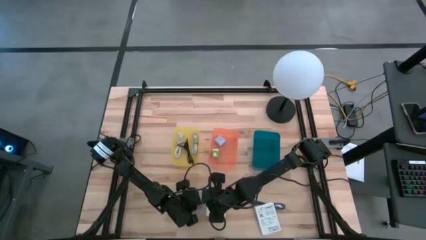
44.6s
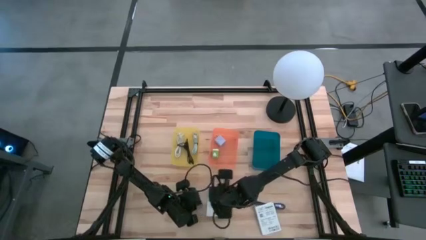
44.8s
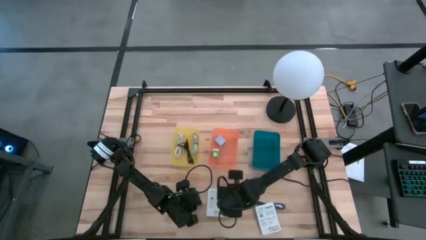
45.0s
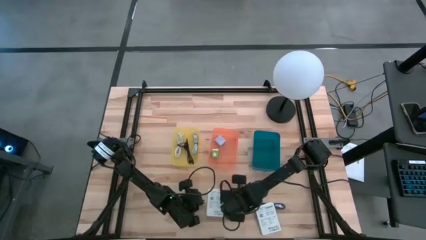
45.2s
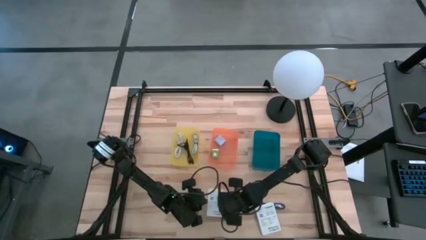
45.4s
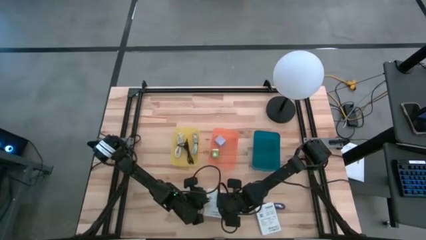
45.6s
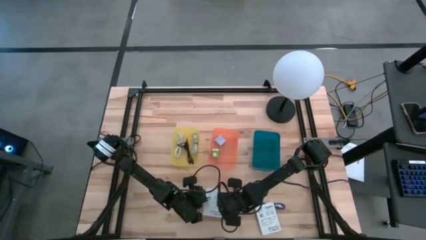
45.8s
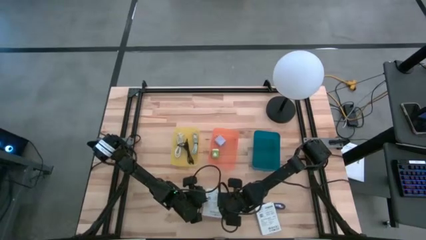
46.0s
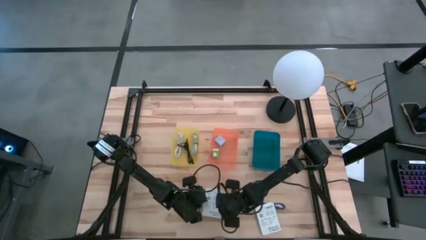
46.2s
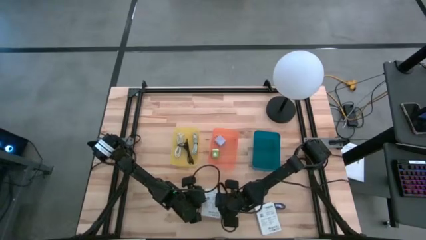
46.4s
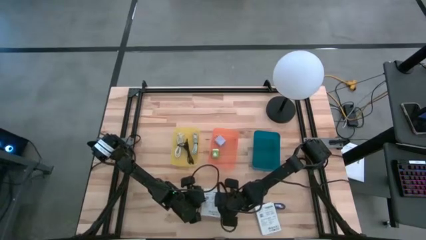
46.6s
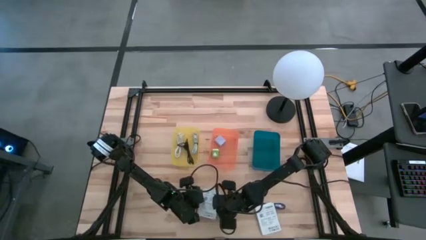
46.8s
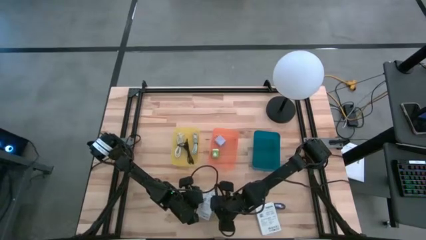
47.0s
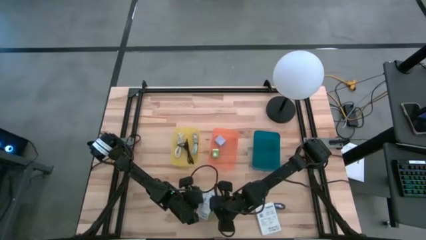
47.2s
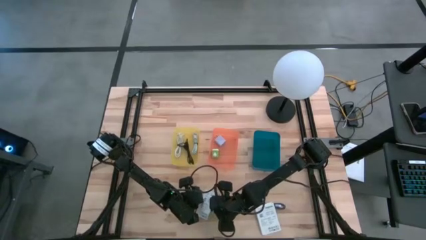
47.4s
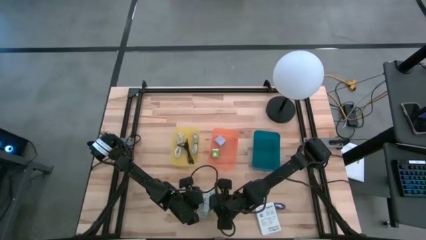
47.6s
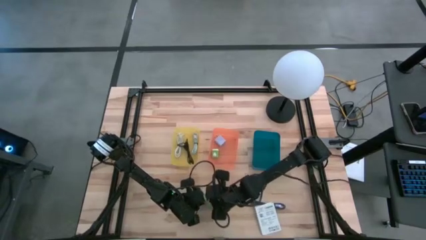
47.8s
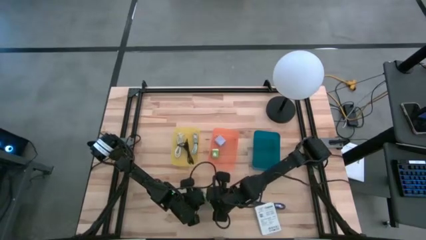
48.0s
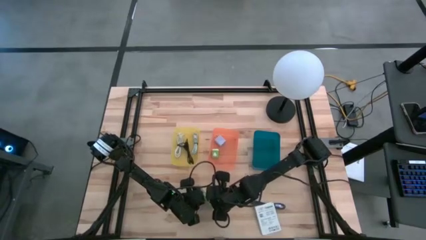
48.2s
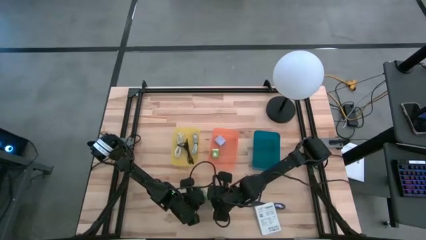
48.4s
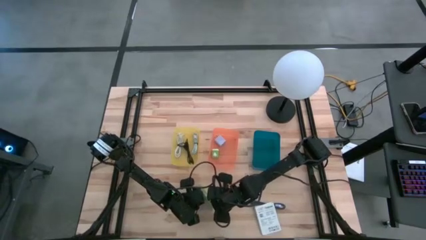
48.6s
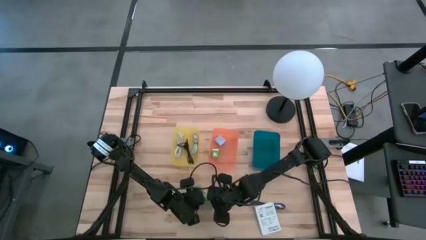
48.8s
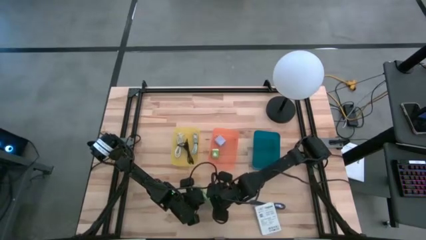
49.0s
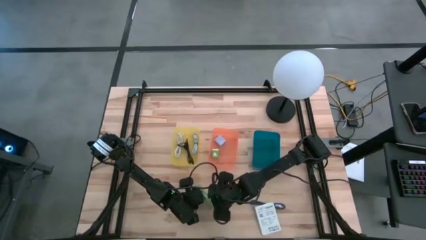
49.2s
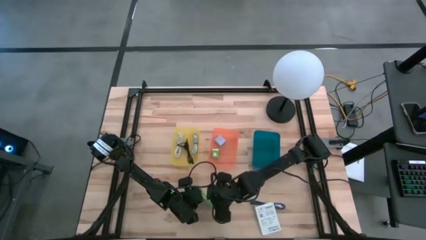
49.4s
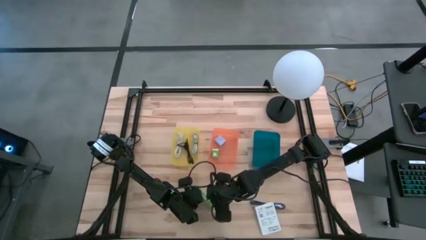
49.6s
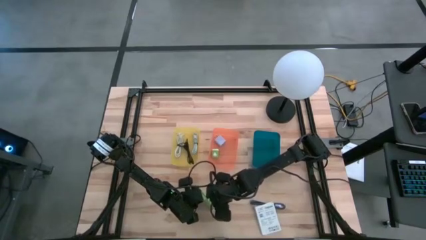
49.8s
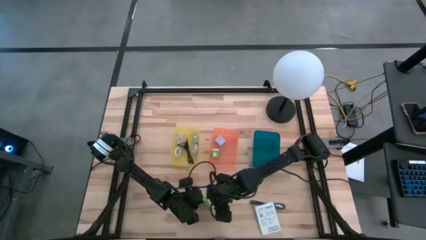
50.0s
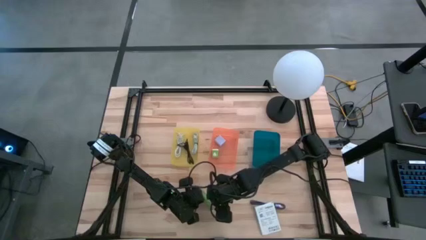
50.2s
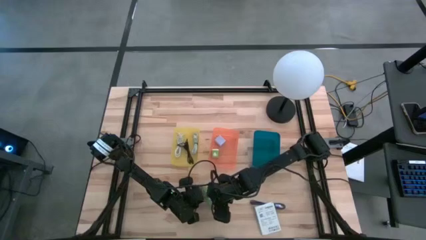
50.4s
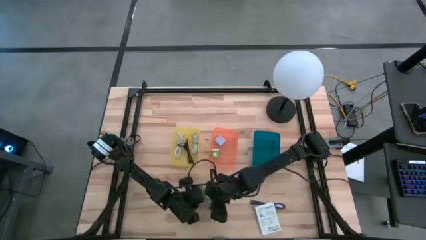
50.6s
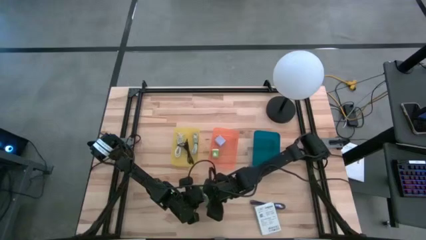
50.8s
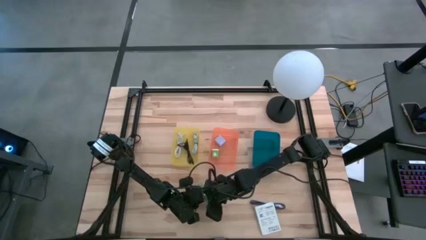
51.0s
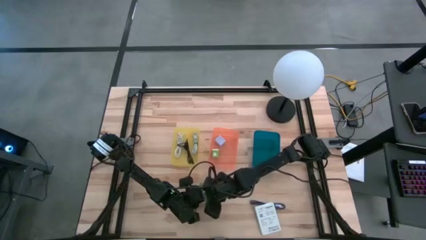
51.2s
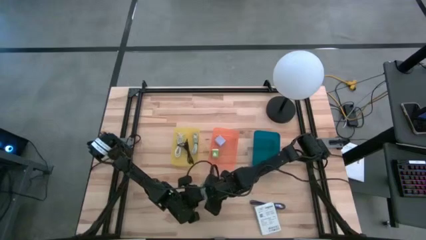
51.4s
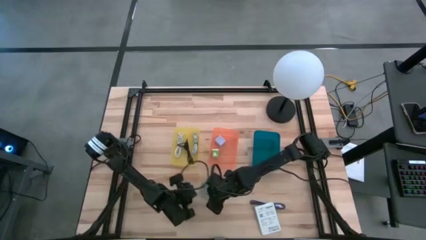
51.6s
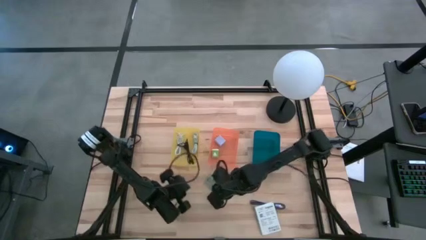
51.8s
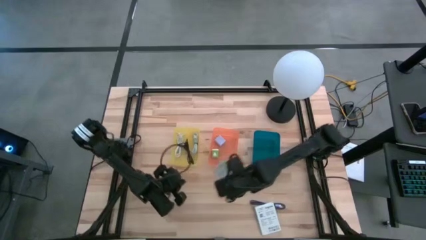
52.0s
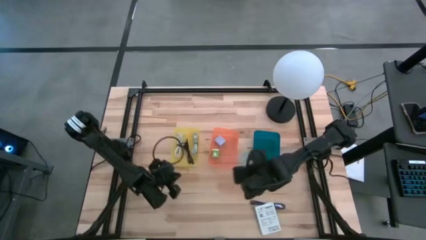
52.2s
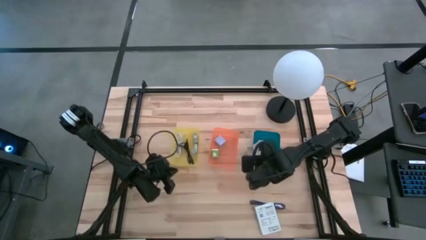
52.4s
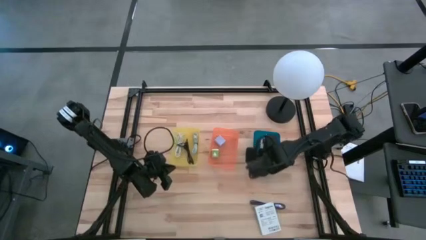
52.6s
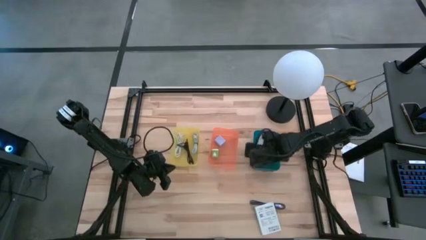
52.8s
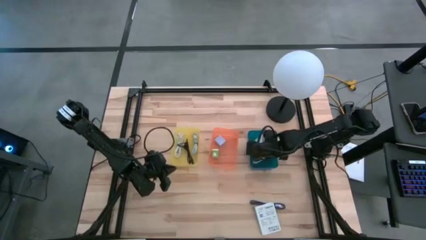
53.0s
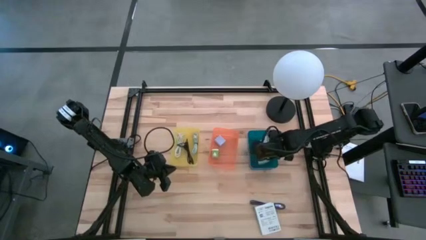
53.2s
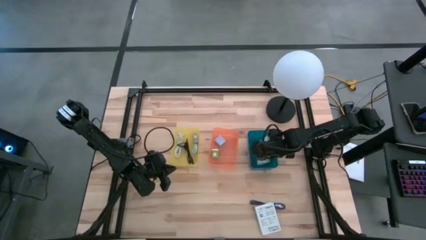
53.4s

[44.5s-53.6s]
Task: Pick and place items into bin
Put the top white card reader box into the blue bin

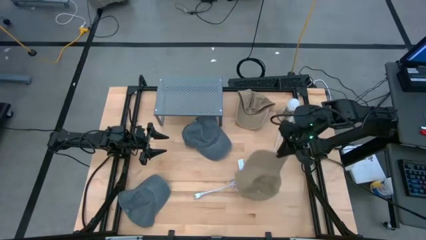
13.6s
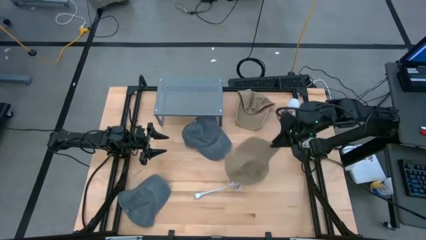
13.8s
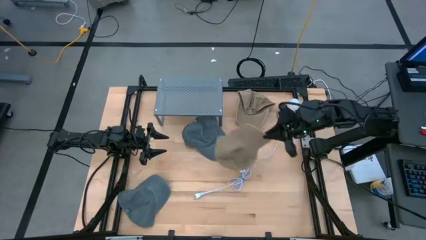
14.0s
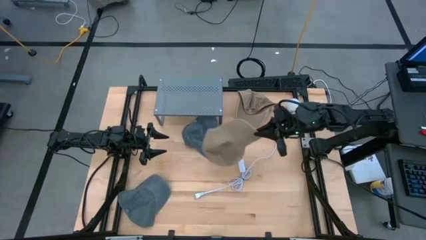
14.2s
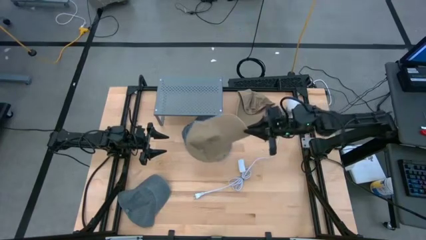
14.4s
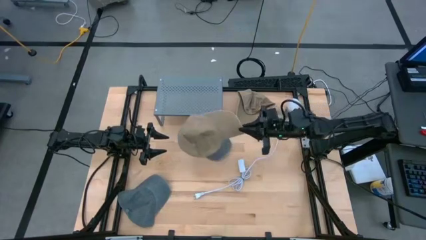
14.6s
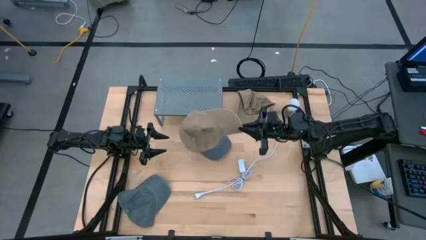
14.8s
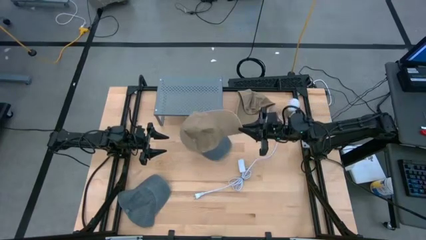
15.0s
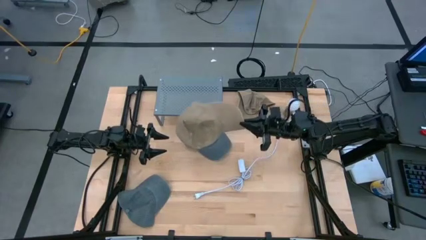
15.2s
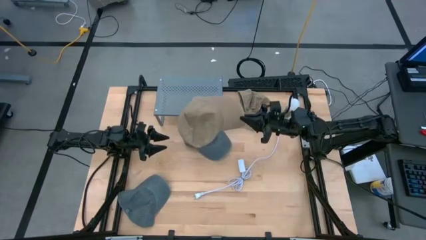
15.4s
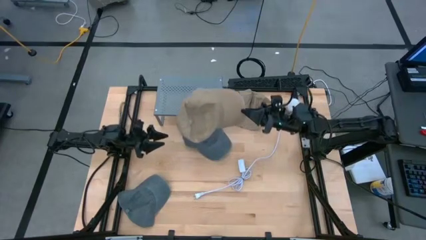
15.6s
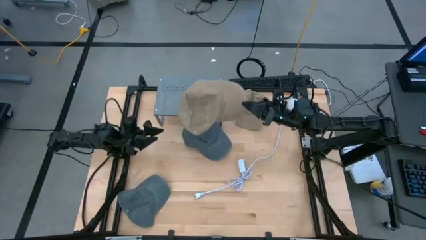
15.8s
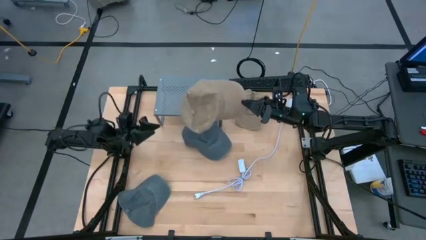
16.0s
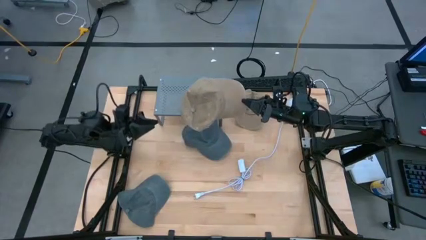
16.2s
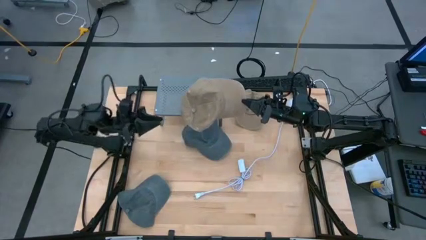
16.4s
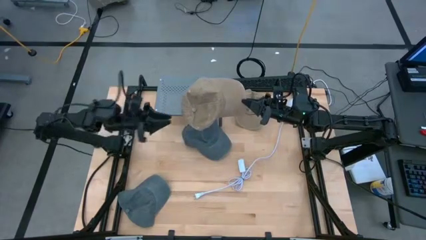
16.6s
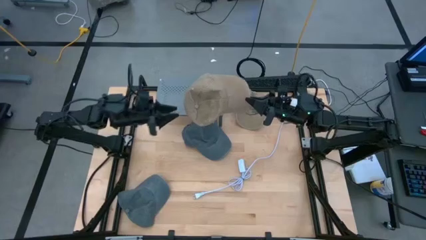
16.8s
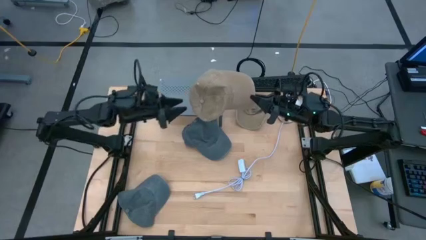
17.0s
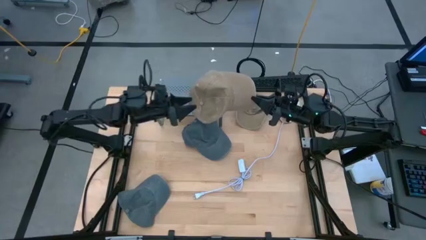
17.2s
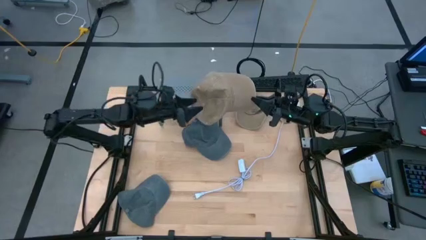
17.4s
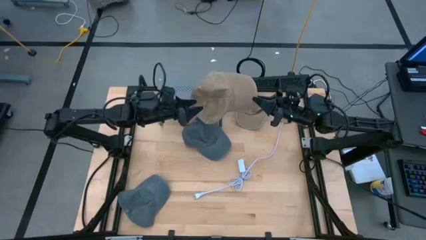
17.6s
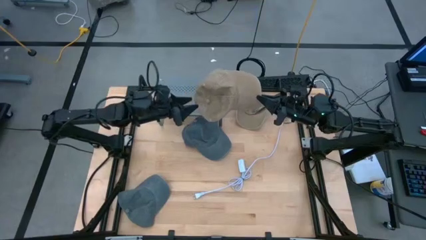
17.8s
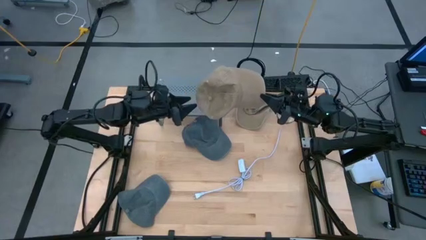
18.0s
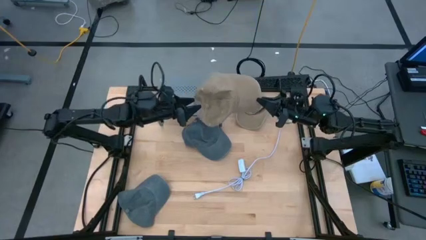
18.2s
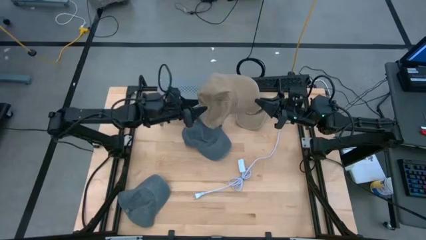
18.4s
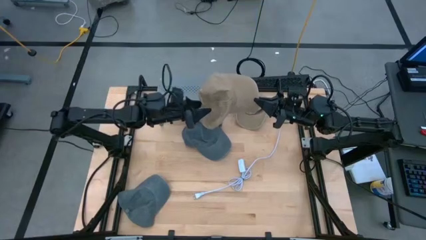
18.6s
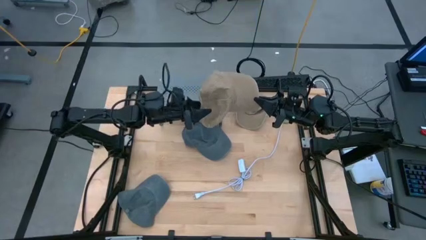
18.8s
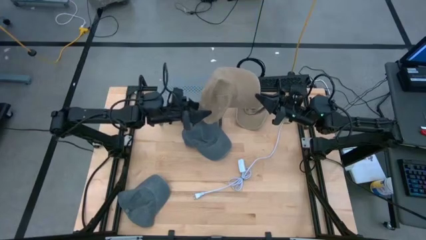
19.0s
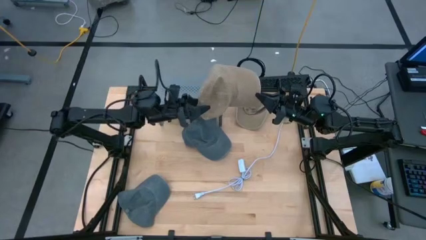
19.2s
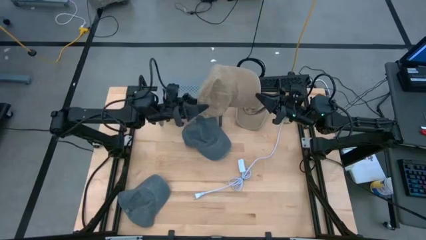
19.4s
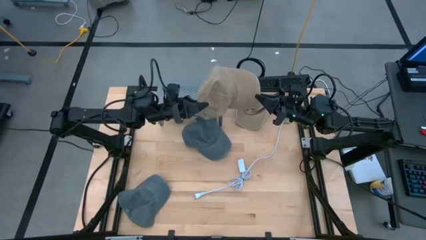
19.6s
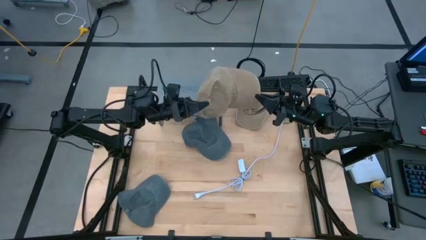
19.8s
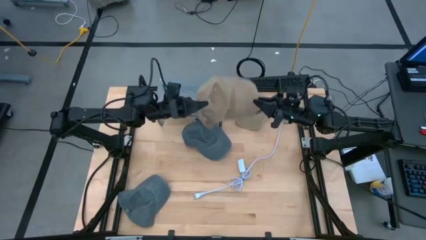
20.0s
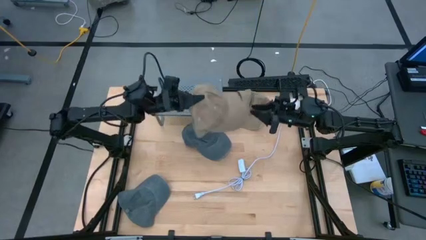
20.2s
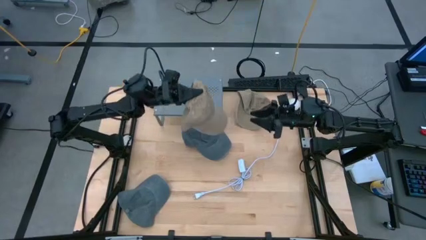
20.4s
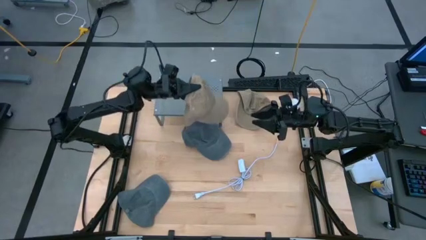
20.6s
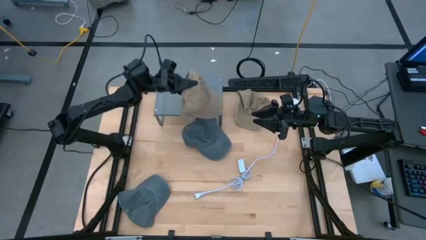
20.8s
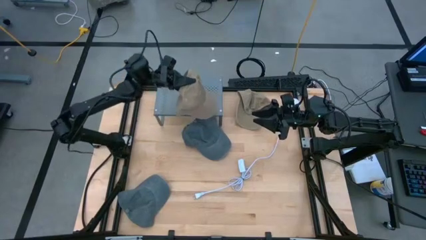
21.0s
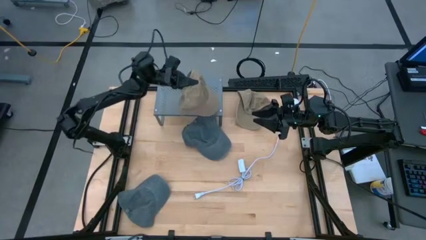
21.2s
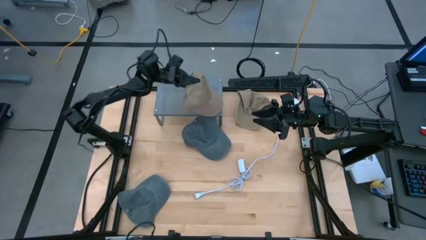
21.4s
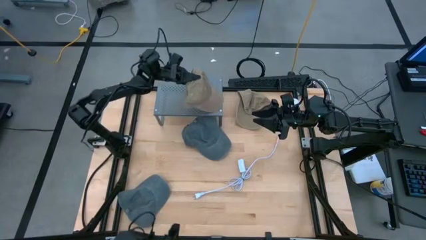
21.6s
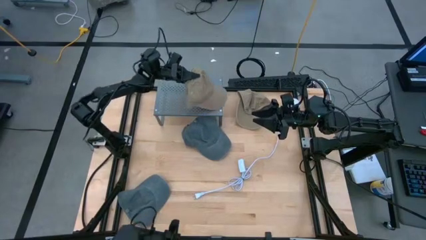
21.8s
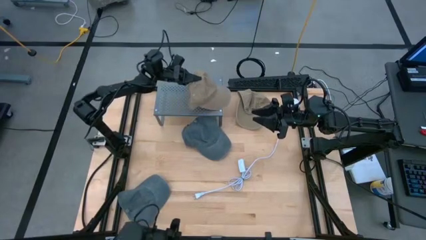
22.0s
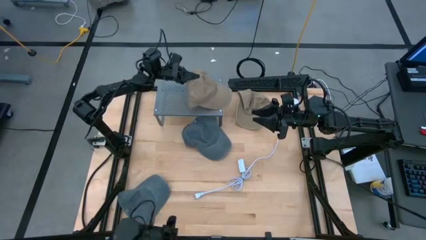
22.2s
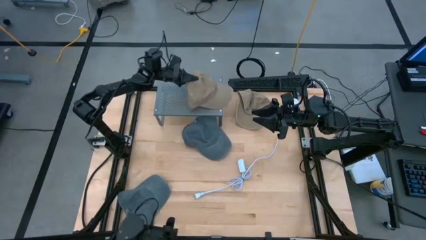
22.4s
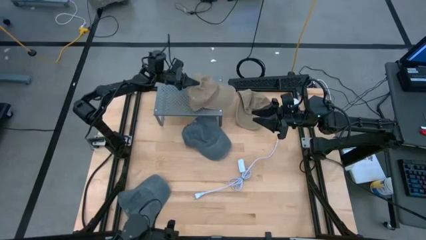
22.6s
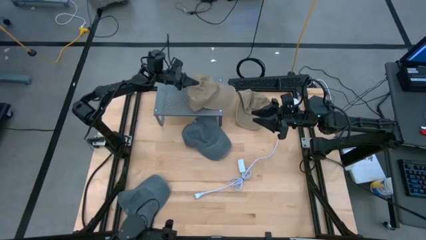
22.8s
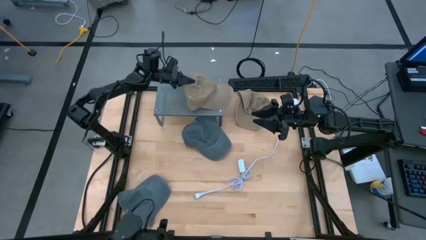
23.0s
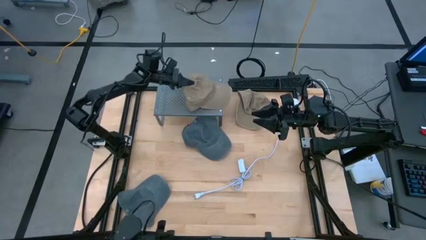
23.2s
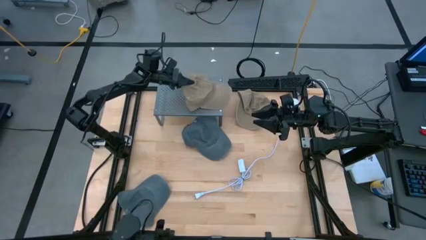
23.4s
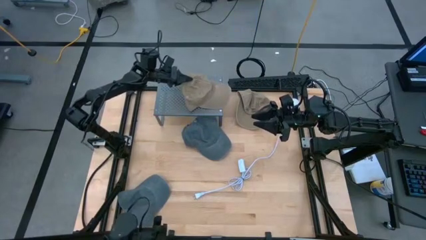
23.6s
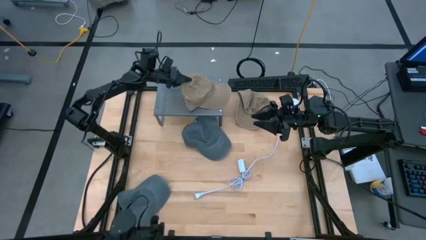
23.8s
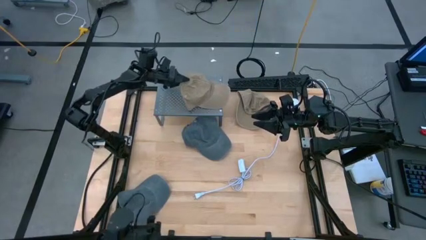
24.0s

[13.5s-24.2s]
Task: Pick & Place hat
Put the bottom brown cap on the shelf
